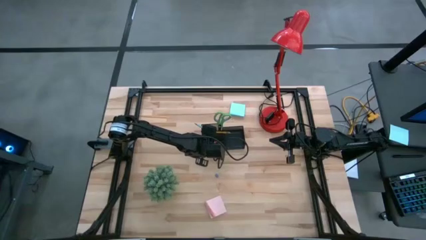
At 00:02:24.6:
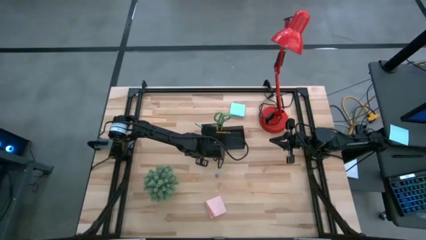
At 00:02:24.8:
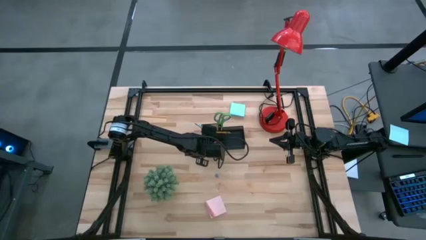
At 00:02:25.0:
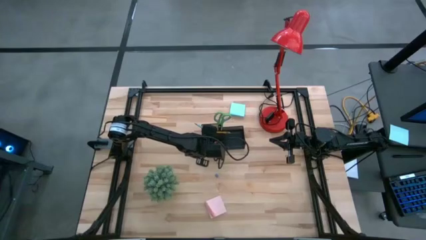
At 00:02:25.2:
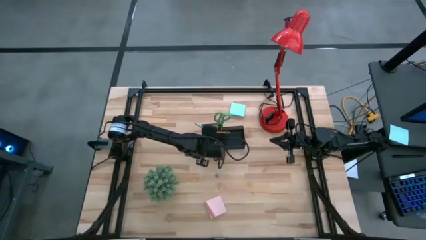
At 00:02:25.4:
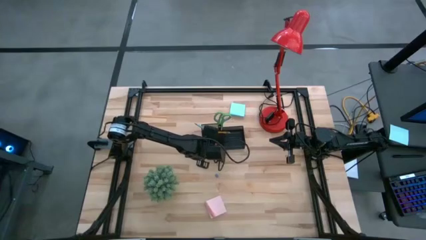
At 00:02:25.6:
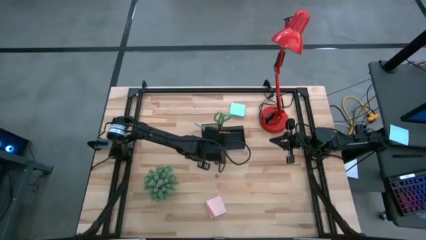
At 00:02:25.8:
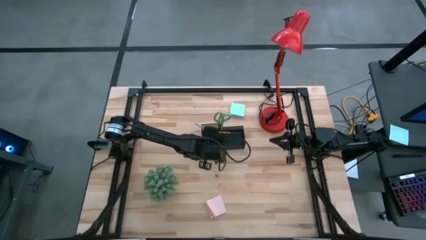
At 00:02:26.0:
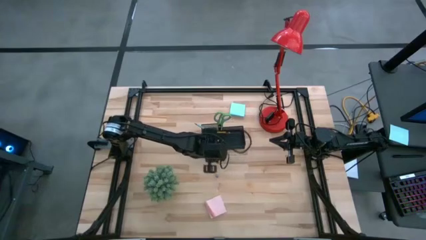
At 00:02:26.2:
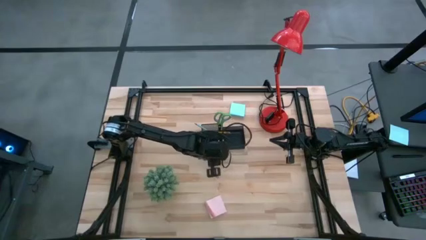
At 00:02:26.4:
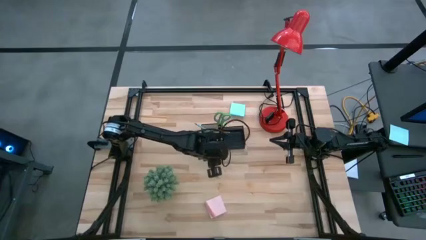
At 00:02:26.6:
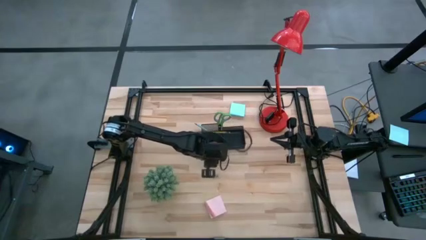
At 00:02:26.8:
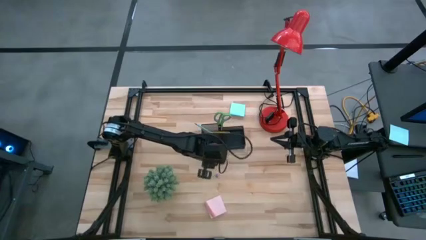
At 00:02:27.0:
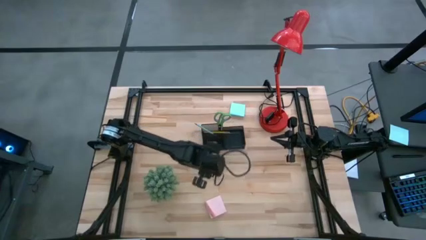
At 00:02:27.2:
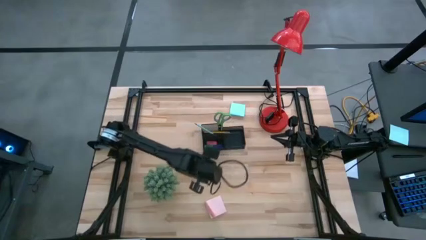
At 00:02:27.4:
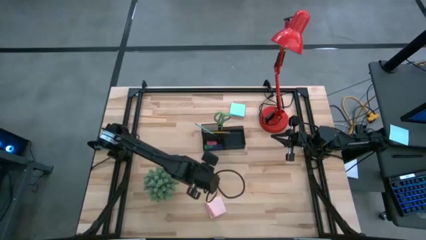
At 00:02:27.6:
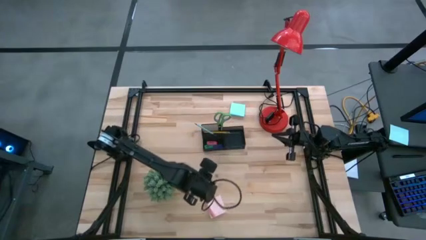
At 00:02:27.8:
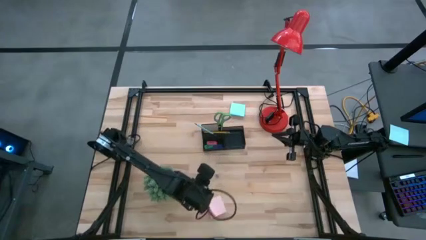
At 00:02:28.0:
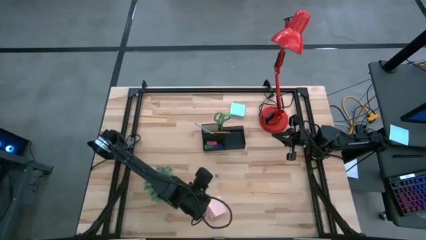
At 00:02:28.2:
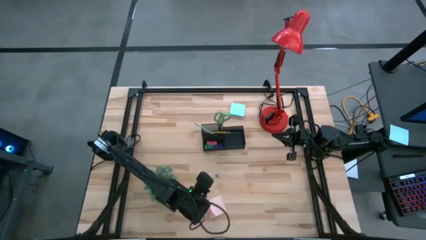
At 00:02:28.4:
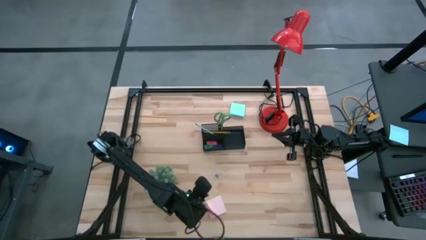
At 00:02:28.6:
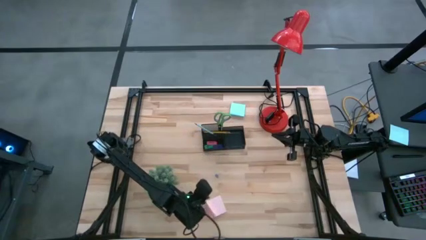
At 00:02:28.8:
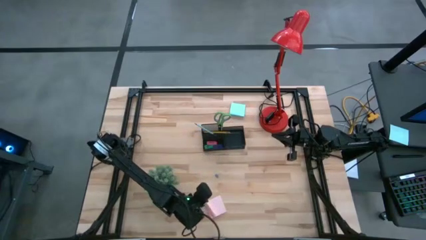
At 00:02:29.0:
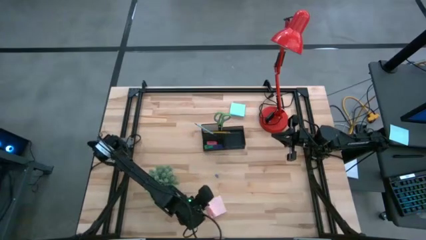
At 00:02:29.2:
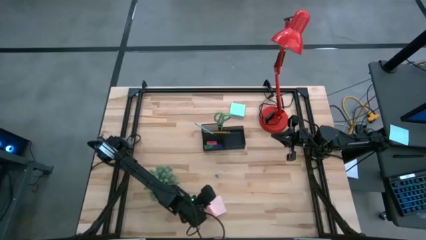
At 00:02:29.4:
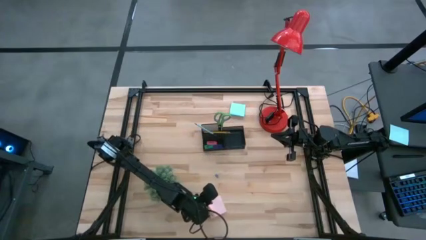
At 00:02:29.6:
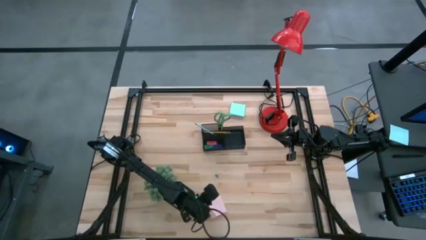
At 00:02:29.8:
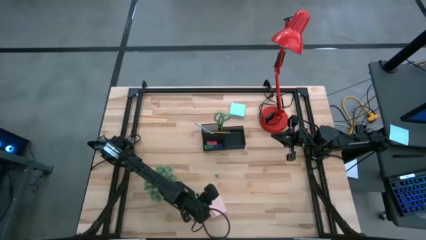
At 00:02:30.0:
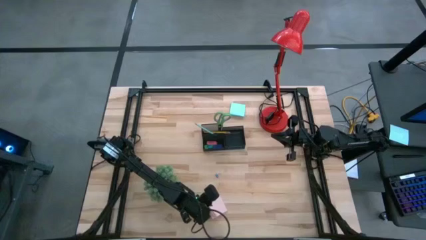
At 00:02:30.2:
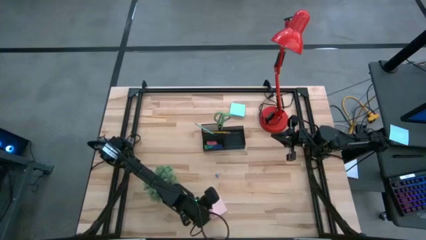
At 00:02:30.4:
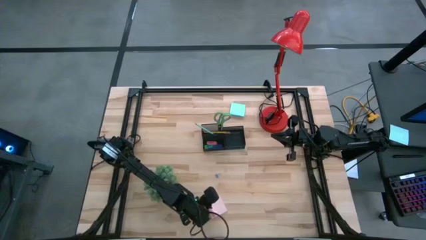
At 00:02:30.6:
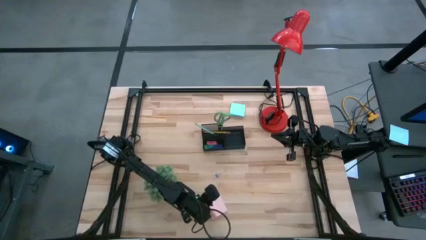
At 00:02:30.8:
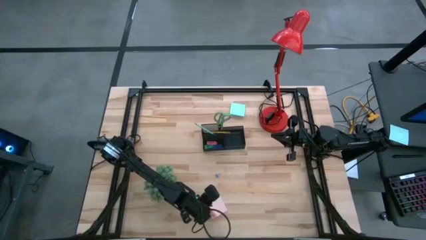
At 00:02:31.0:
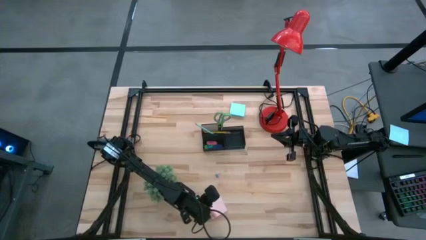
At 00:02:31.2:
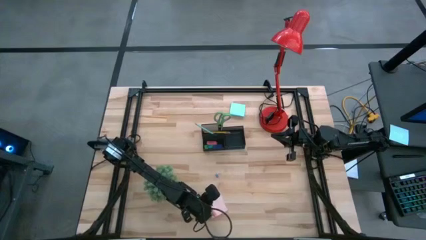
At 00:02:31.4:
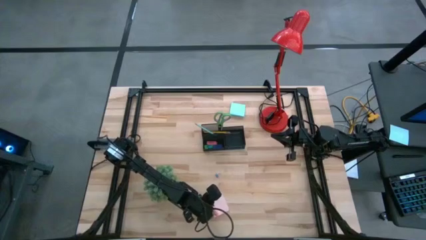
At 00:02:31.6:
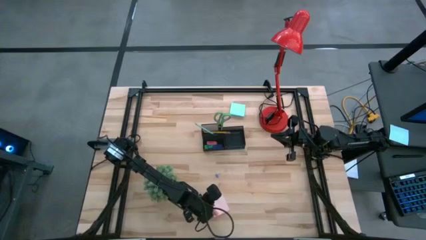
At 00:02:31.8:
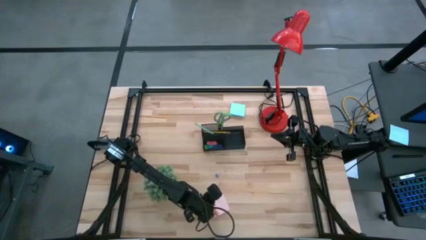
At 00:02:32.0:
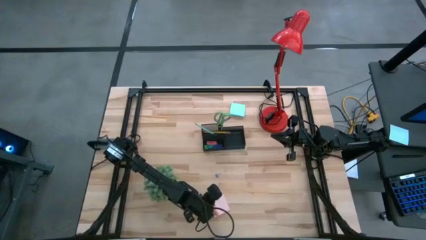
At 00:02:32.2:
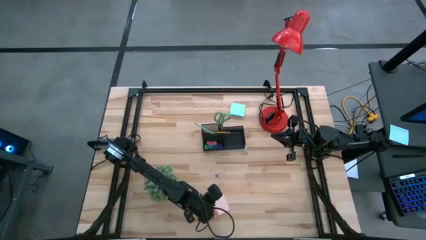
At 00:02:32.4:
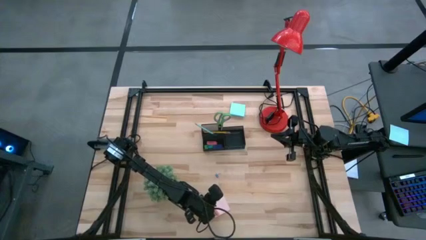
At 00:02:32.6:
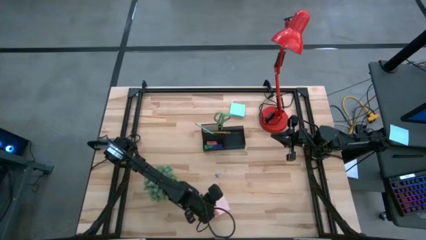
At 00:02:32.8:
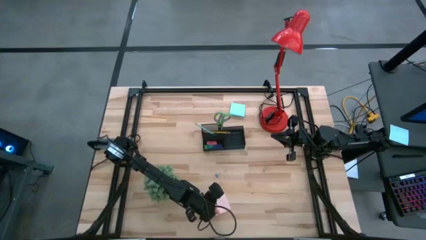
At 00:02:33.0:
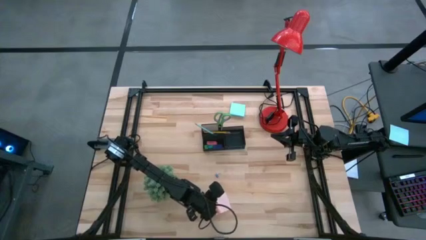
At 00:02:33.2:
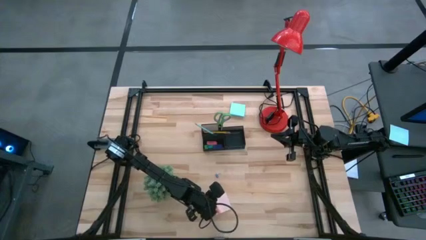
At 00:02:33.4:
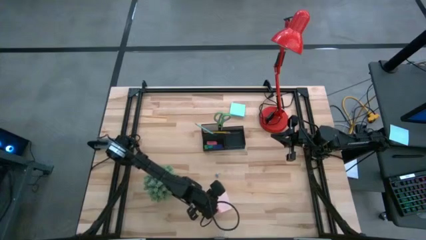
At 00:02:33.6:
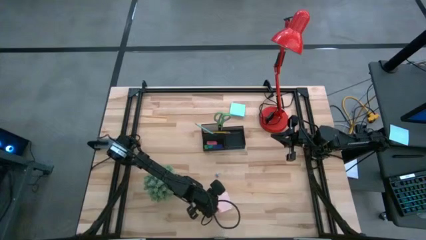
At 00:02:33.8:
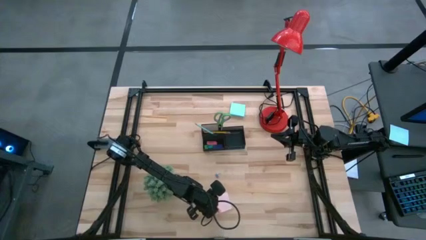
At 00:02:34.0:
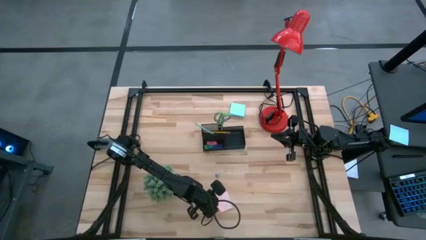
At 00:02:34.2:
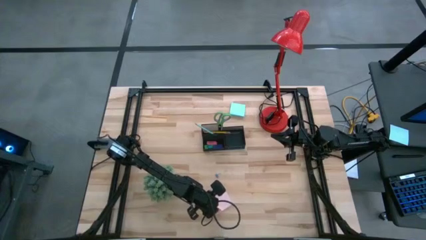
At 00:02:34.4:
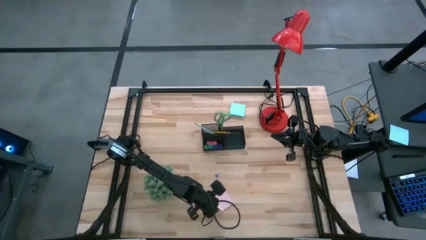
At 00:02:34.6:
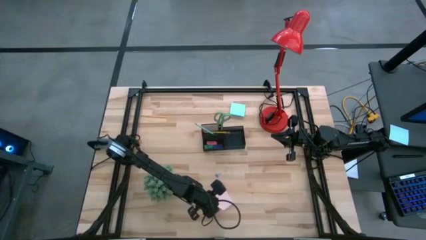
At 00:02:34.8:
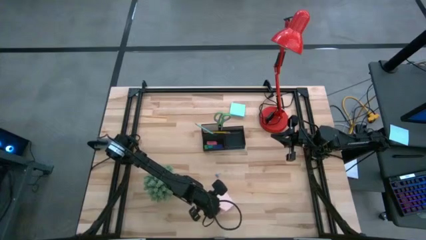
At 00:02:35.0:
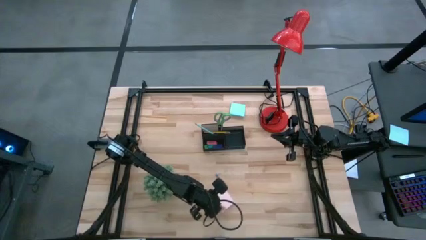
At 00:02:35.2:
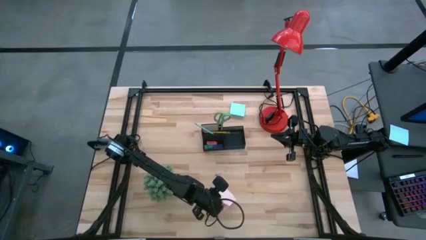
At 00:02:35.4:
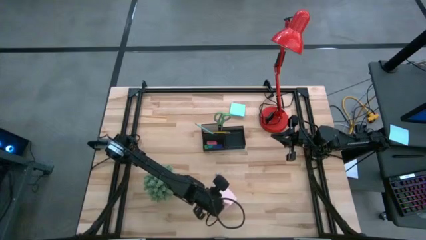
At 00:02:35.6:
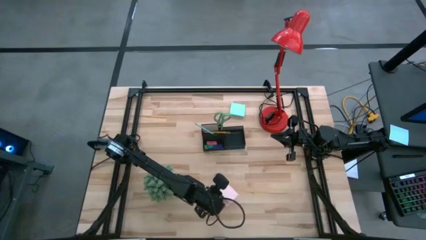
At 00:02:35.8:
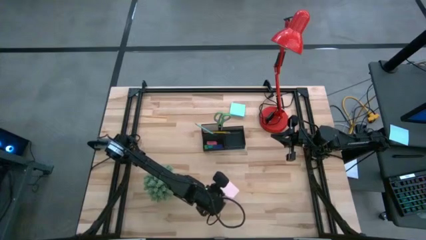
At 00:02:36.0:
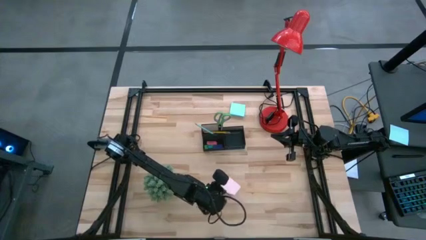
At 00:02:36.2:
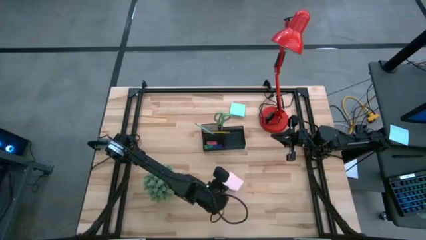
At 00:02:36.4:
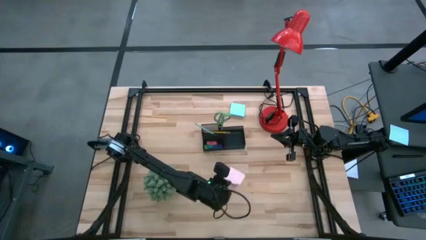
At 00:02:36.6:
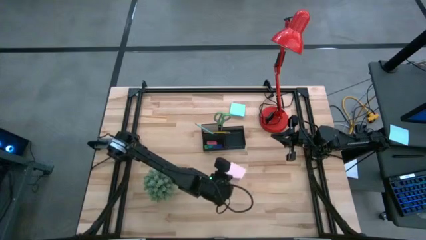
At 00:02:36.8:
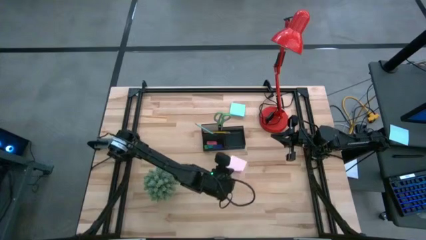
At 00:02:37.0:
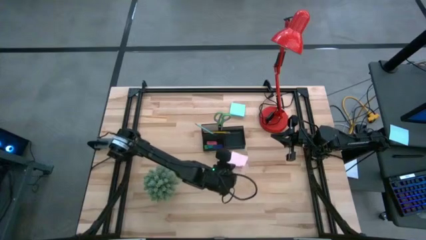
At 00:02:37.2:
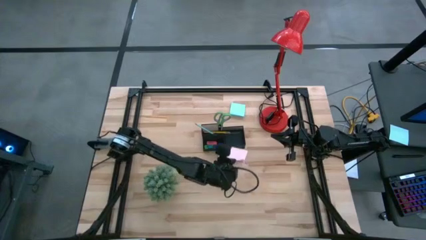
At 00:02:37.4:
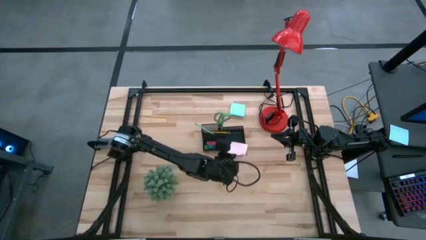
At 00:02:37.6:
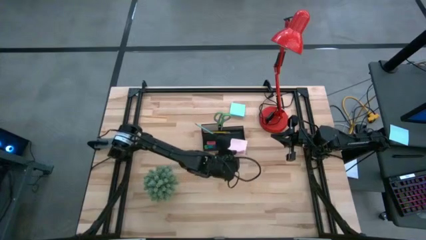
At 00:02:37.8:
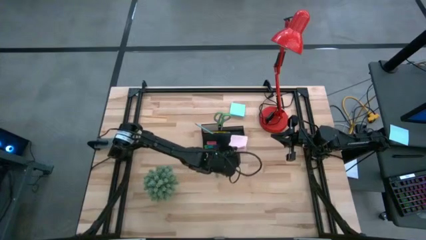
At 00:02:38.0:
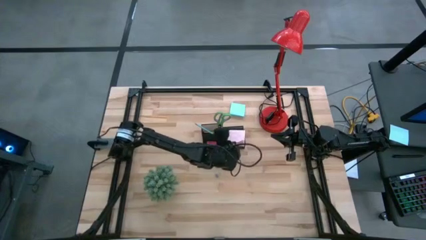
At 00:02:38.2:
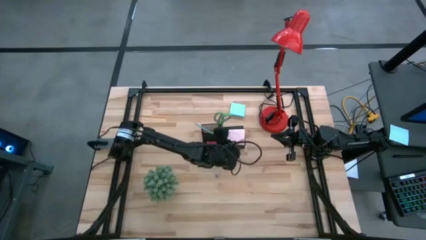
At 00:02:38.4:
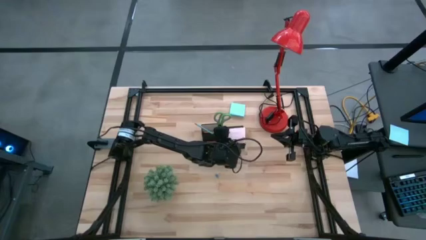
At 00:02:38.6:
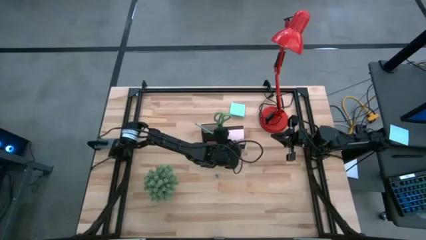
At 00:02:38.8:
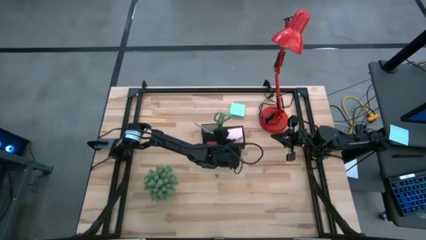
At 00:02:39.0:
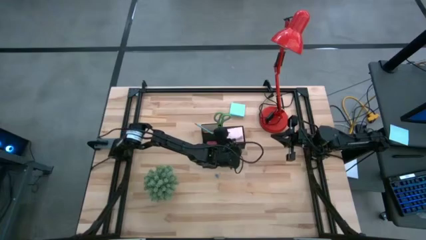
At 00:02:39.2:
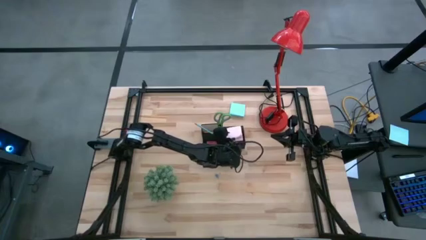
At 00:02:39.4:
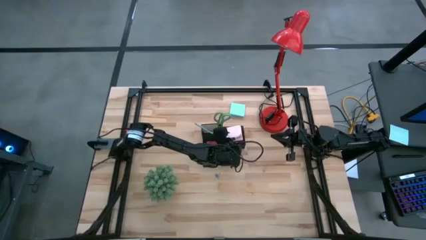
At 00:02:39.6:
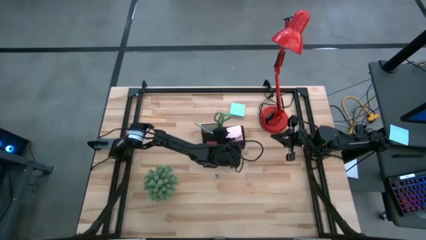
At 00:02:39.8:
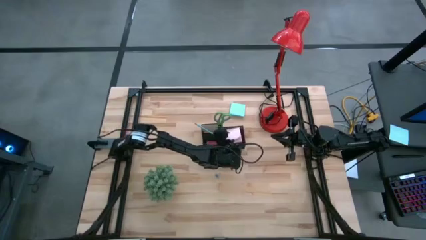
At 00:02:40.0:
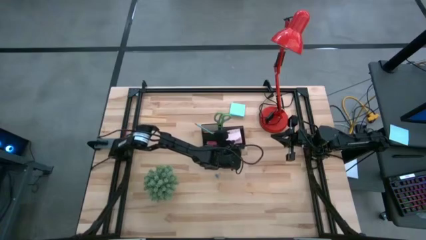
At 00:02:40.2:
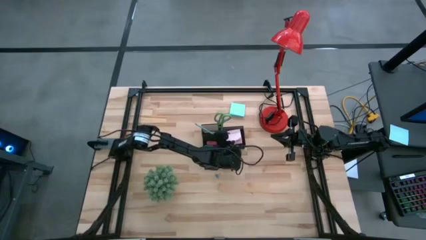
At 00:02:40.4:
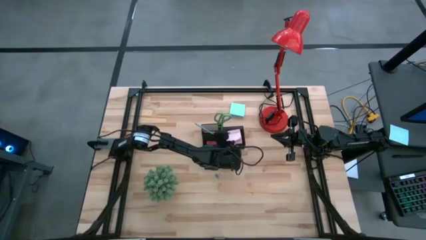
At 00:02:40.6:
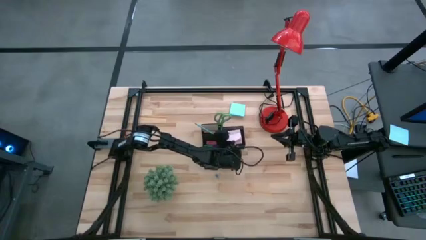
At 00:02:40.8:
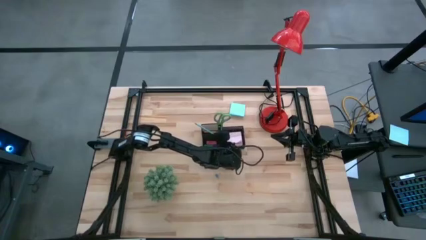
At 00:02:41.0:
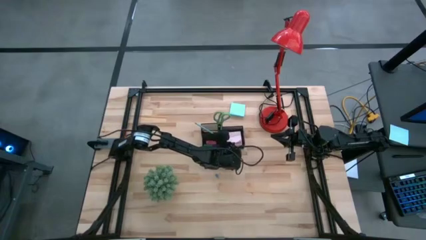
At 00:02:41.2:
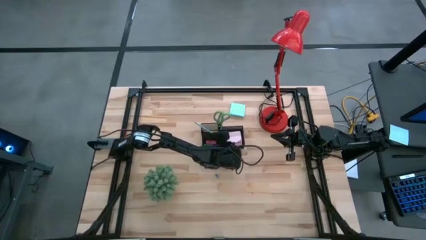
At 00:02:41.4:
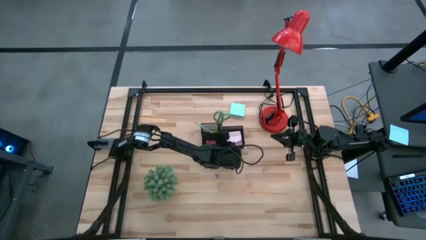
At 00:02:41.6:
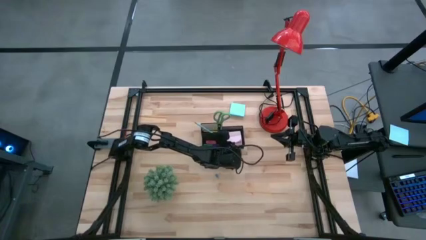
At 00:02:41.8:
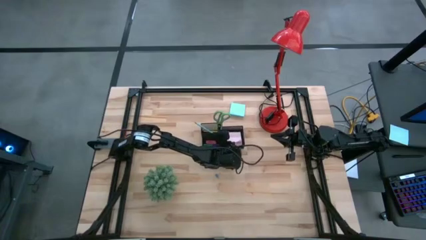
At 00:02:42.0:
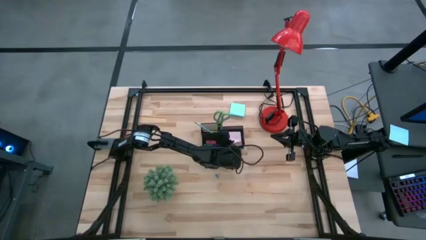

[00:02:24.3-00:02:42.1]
Task: Pick and place office supplies into organizer
Put the pink sticky notes into the black desk organizer
